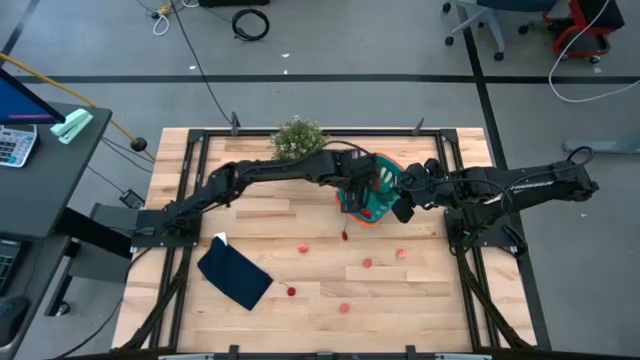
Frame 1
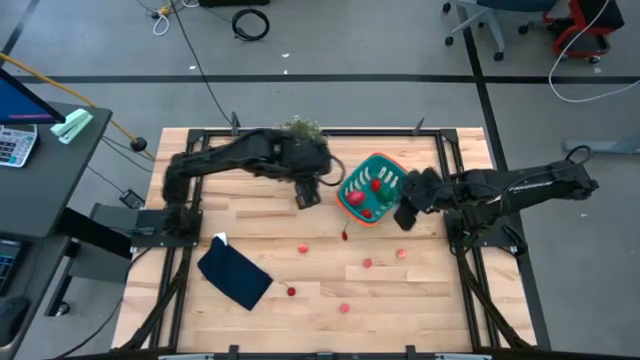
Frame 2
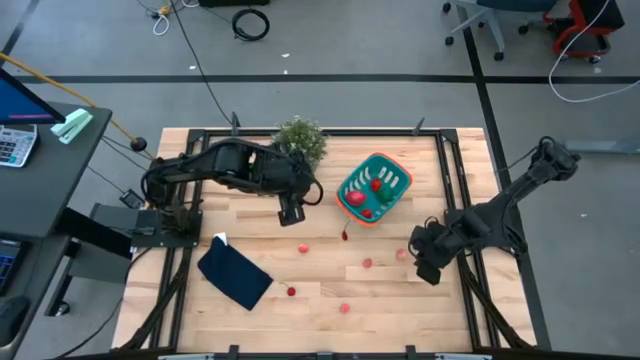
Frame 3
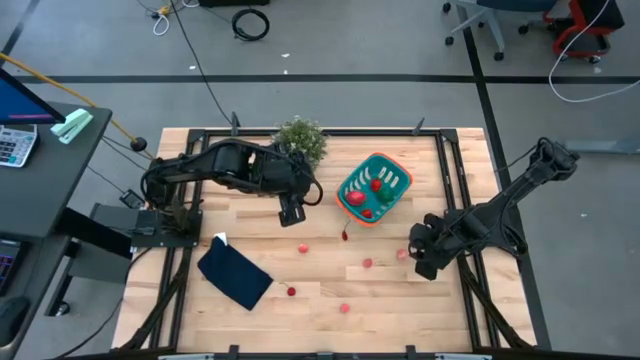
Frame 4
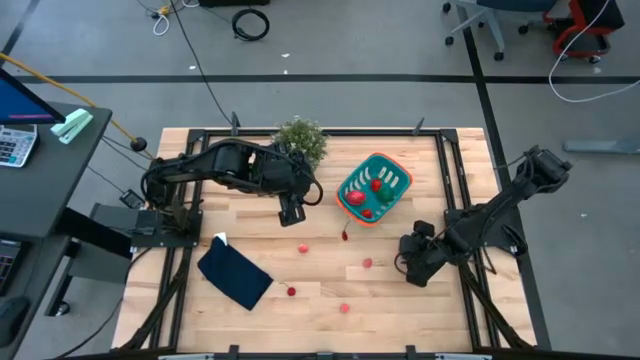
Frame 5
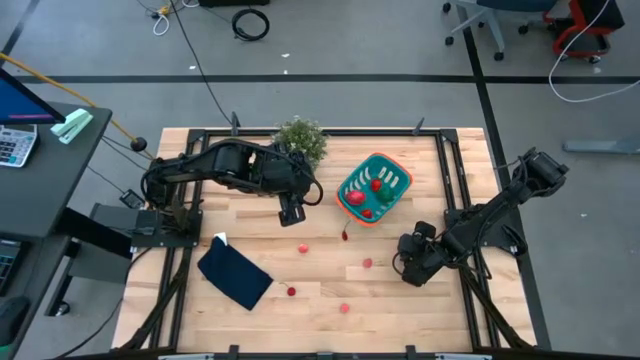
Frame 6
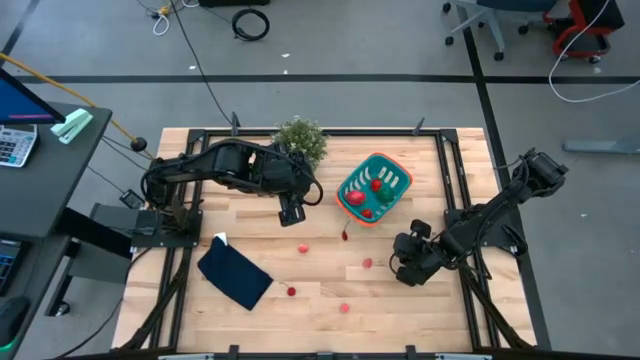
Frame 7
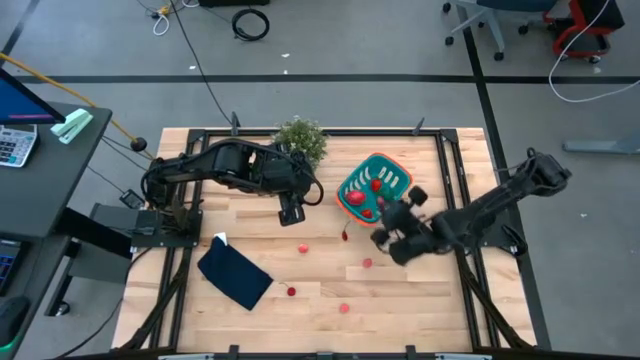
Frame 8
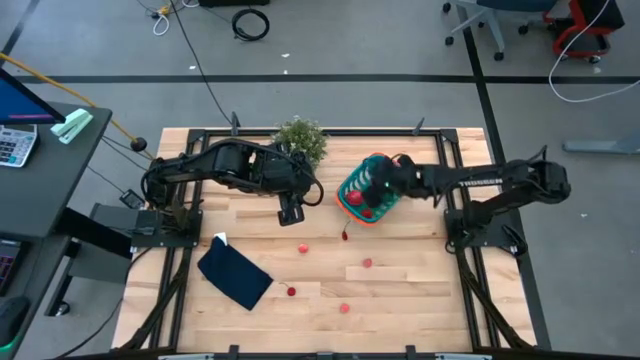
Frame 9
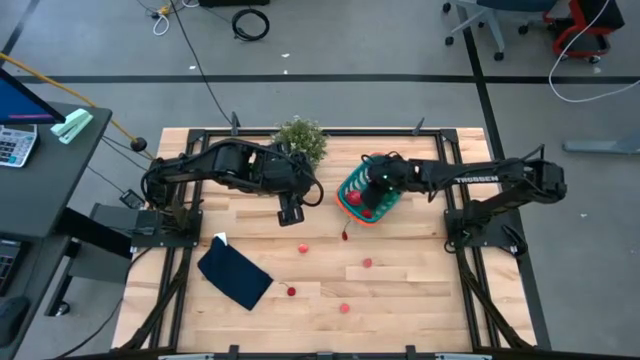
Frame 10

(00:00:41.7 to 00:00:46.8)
Task: Pick and placing Produce into tupperware
Put the pink peach into the basket

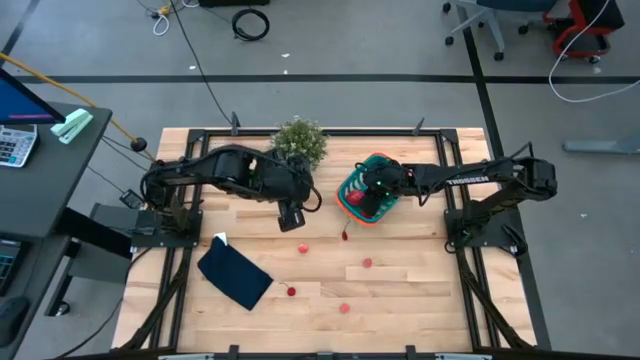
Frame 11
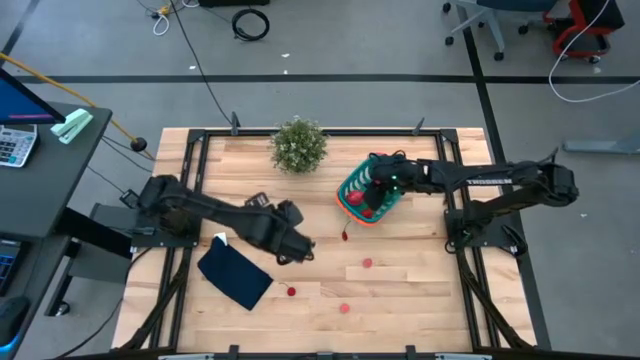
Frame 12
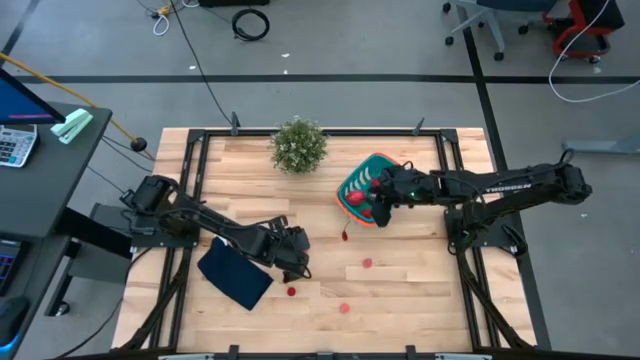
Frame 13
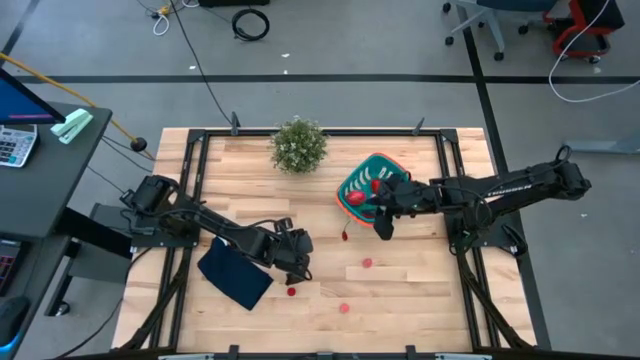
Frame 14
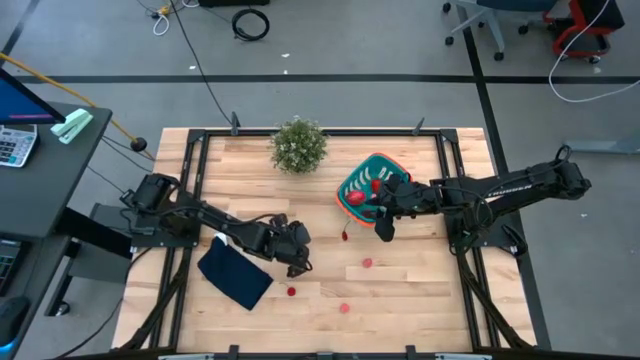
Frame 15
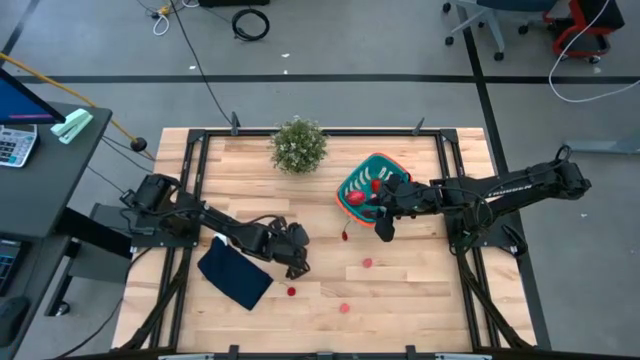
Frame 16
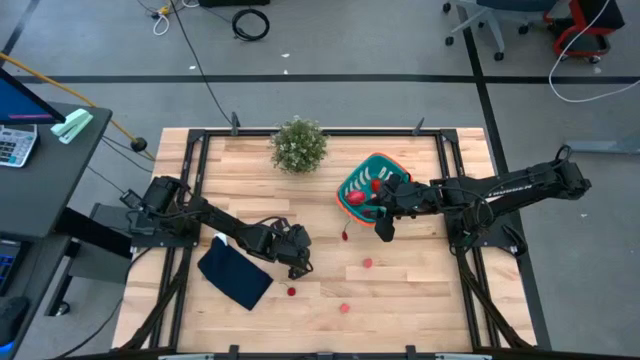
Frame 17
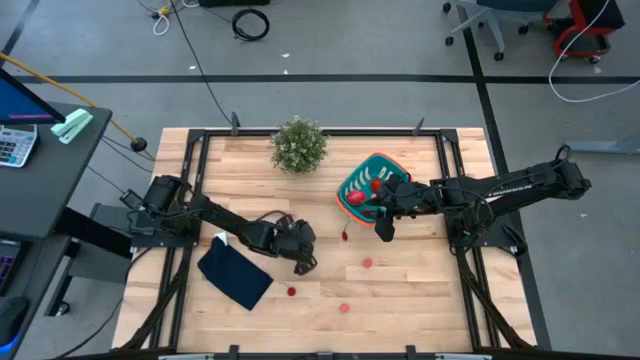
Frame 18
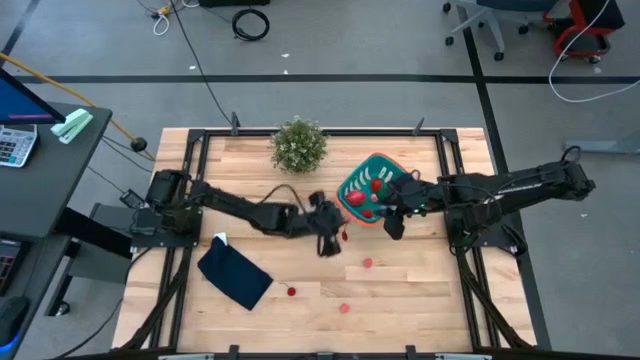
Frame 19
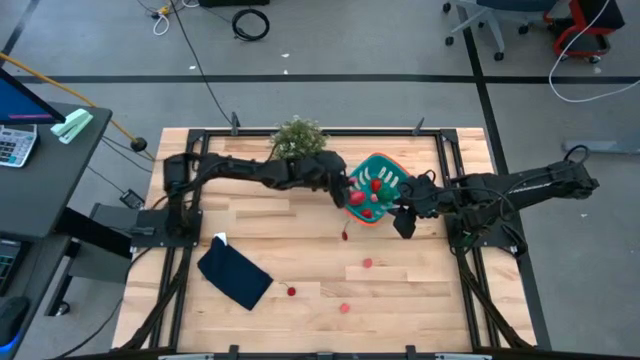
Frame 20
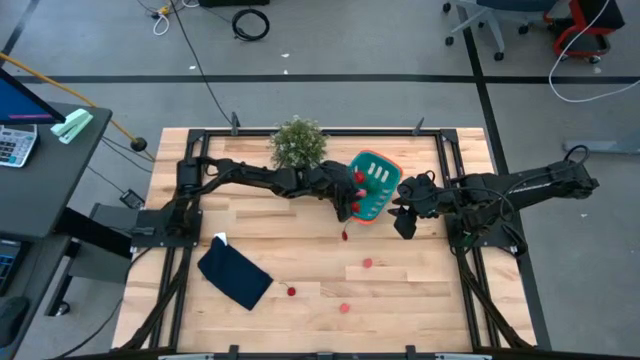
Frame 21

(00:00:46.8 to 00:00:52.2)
Put the pink peach into the basket

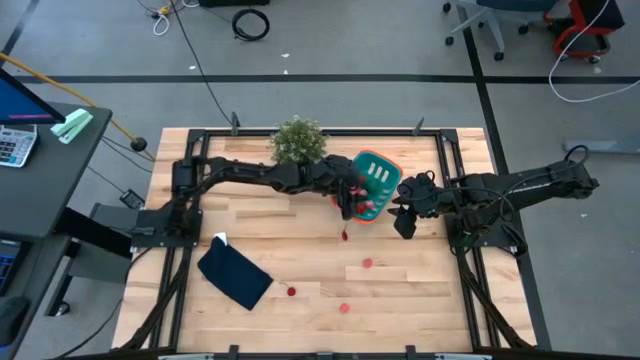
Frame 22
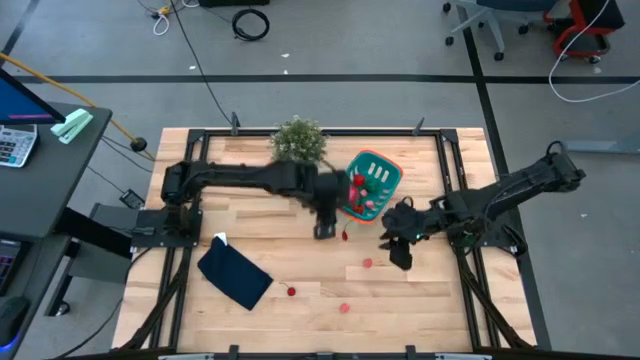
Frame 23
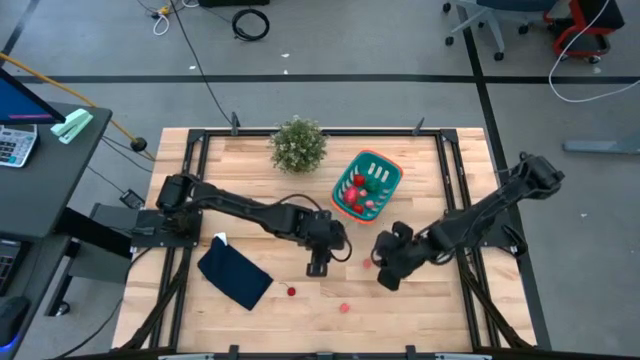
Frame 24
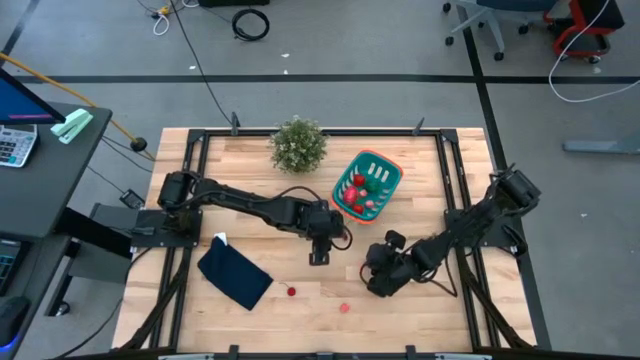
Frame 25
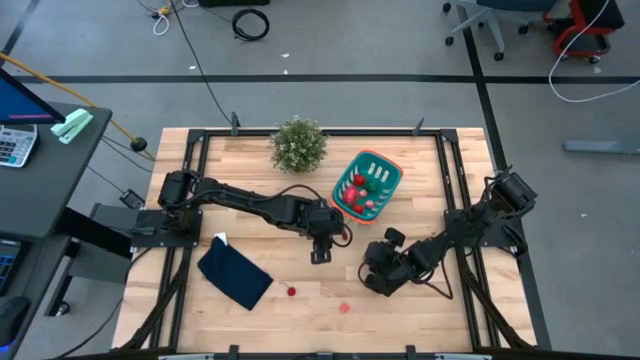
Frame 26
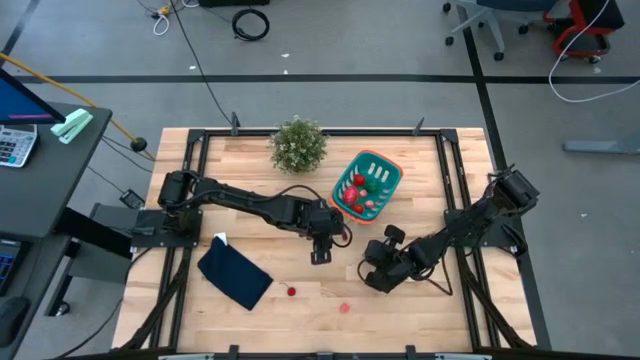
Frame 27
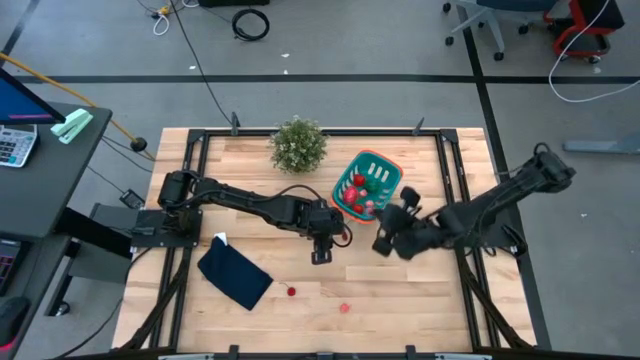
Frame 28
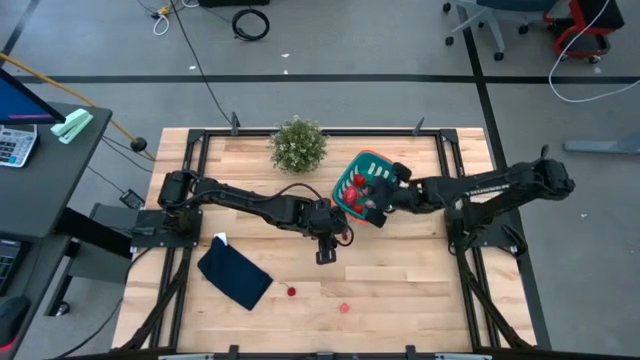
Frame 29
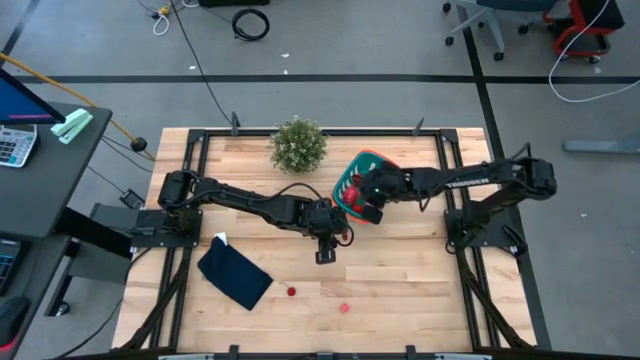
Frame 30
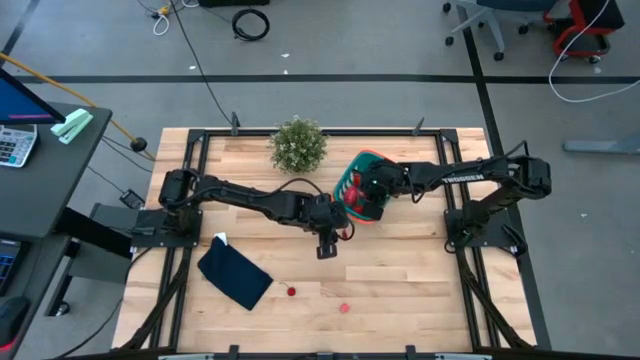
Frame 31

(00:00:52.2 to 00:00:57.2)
Put the pink peach into the basket

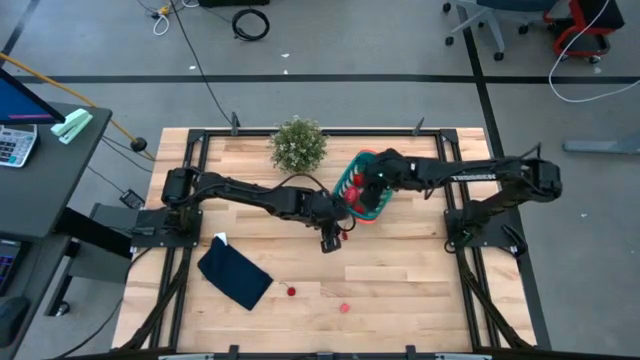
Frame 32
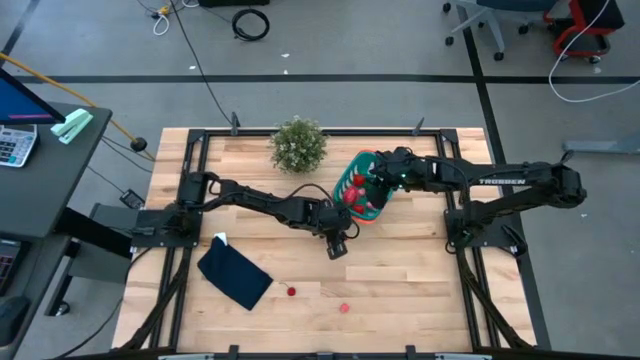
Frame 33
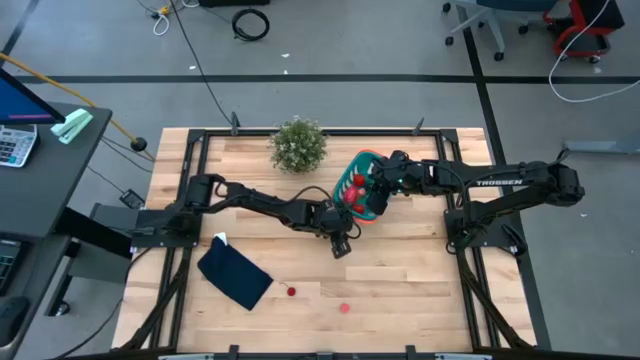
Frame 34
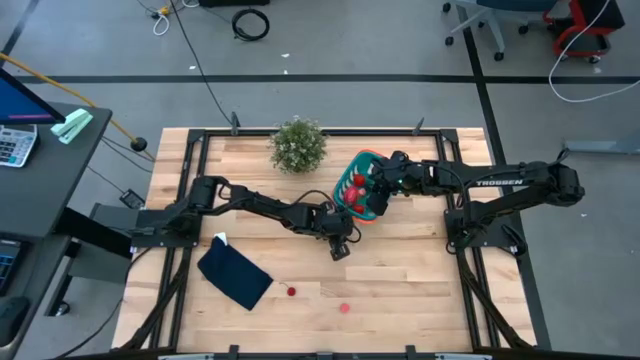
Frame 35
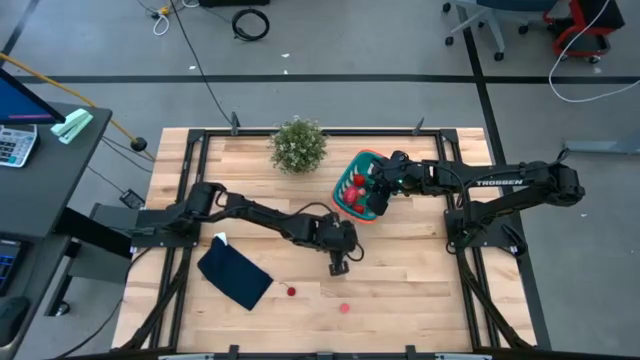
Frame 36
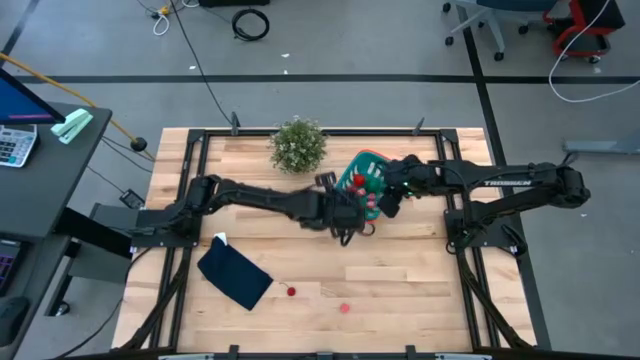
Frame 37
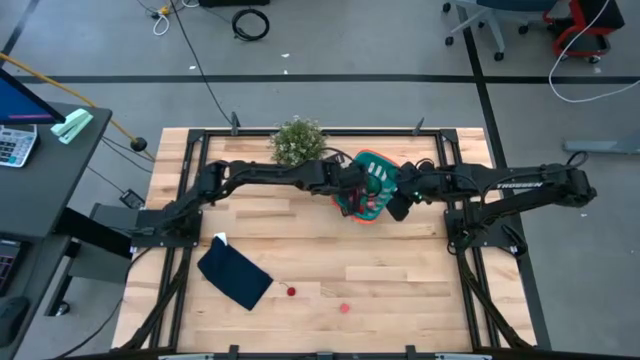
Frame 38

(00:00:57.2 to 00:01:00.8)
Put the red cherry into the basket

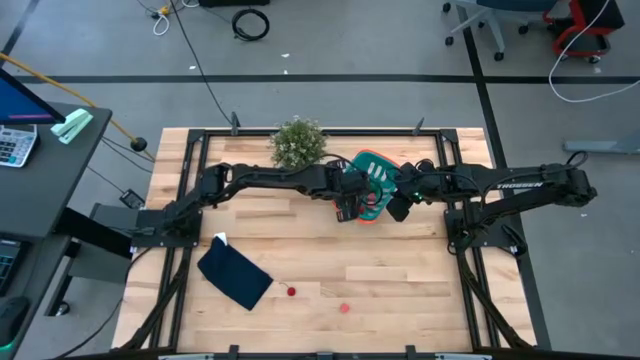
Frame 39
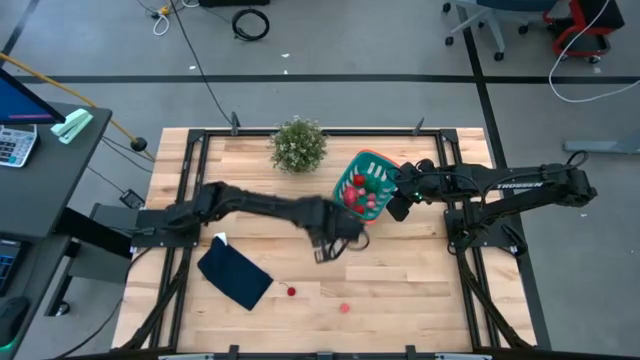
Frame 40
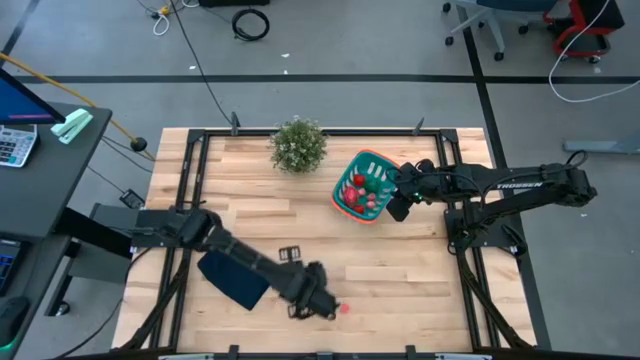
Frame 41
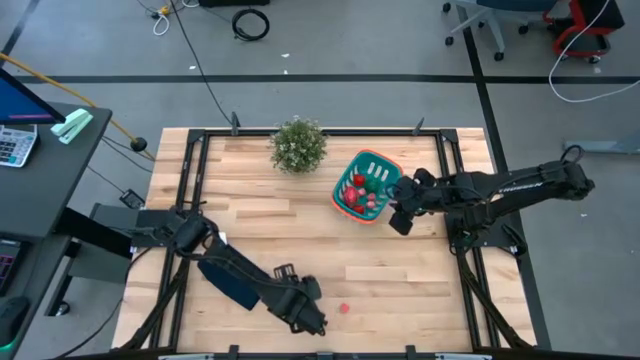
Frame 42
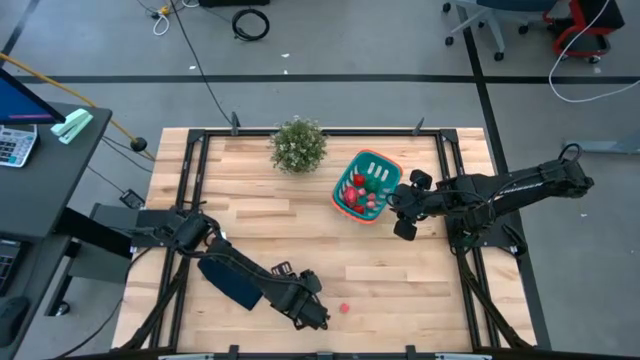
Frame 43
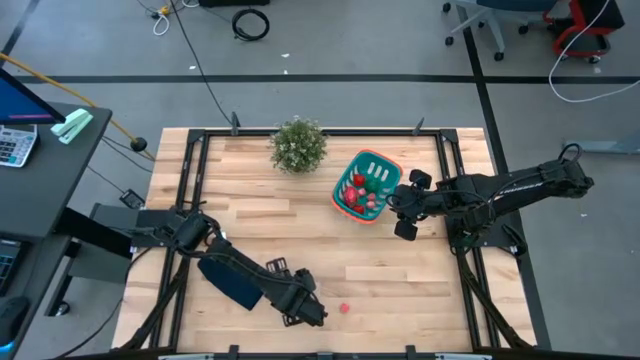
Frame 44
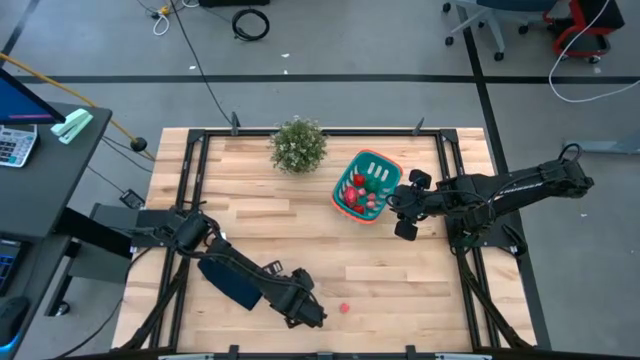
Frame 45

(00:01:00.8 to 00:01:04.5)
Put the red cherry into the basket
